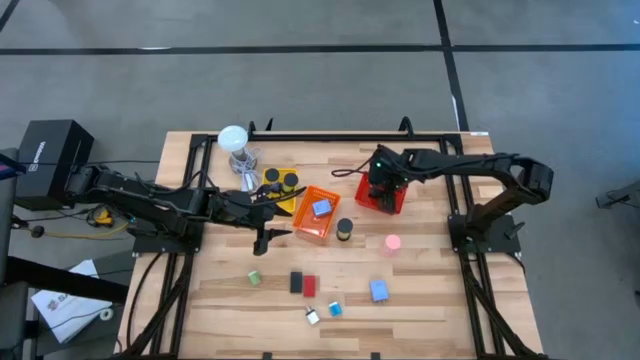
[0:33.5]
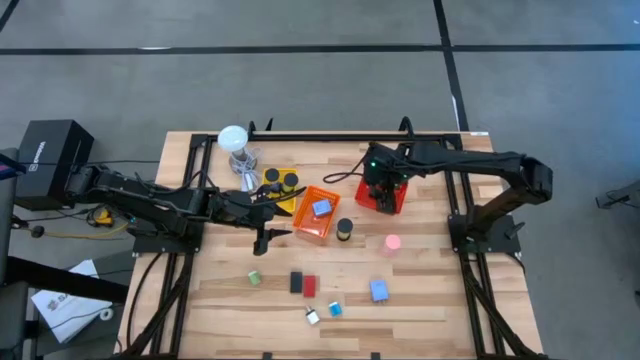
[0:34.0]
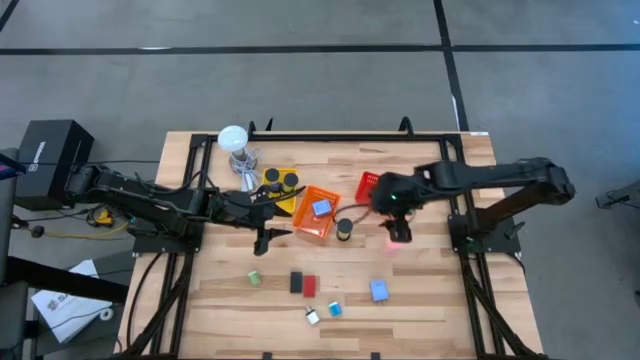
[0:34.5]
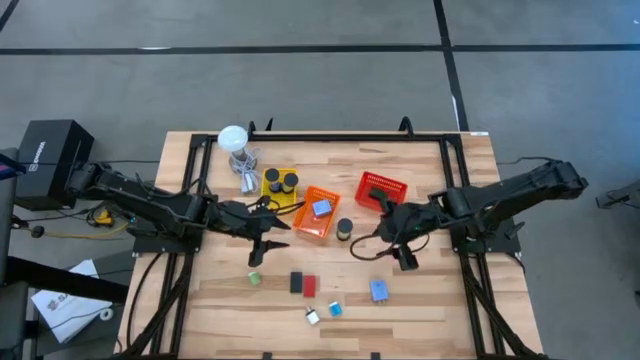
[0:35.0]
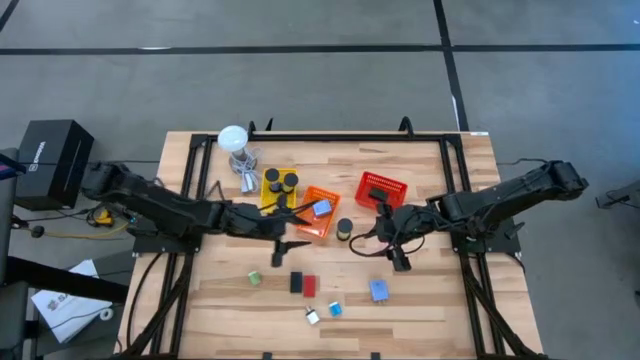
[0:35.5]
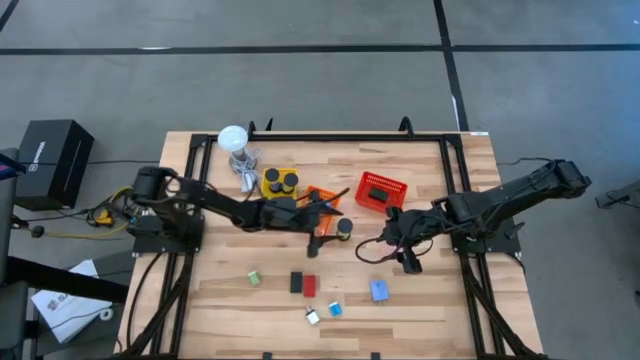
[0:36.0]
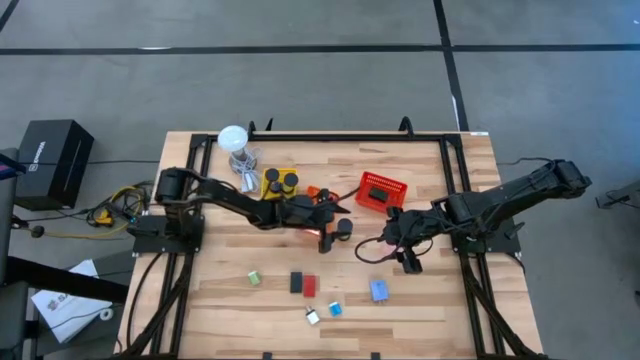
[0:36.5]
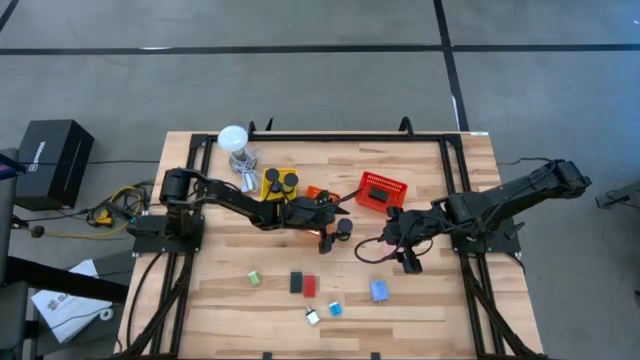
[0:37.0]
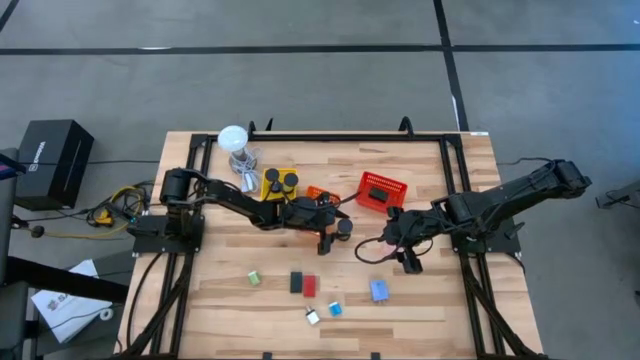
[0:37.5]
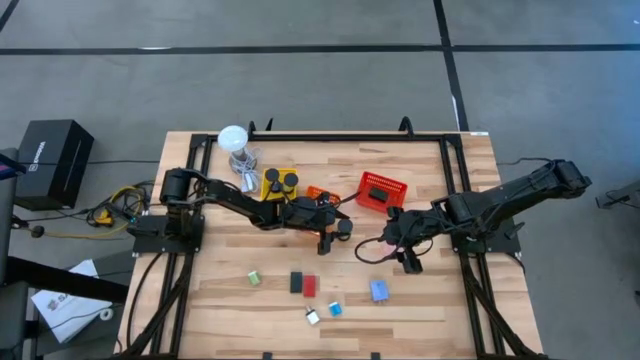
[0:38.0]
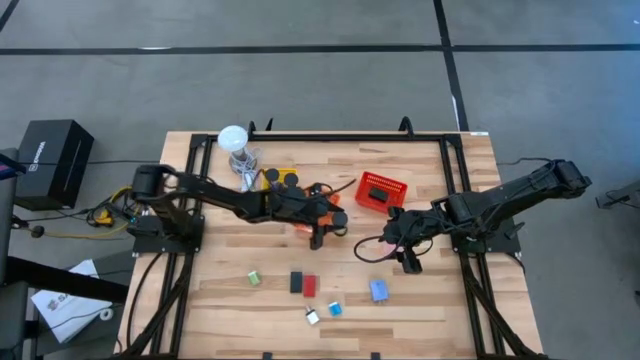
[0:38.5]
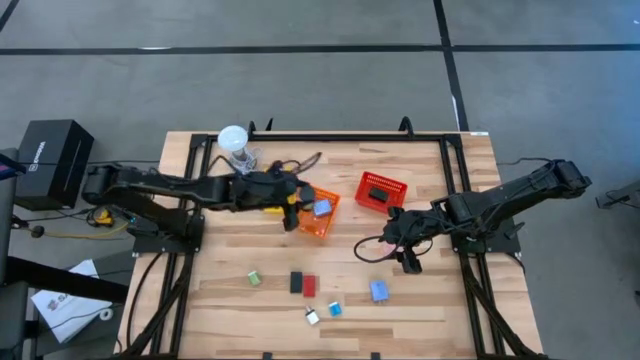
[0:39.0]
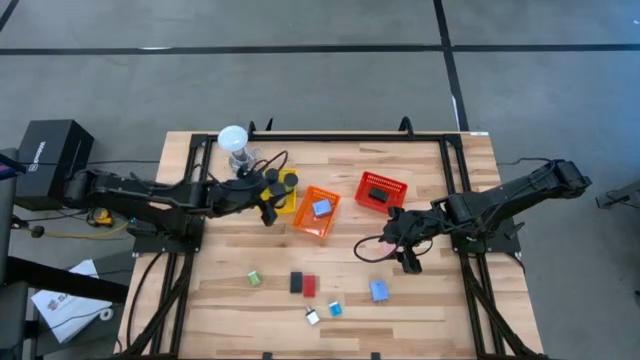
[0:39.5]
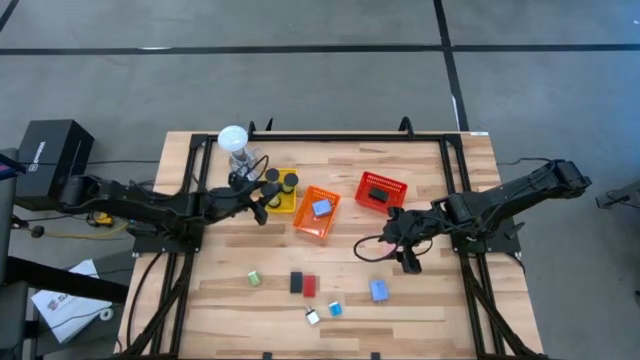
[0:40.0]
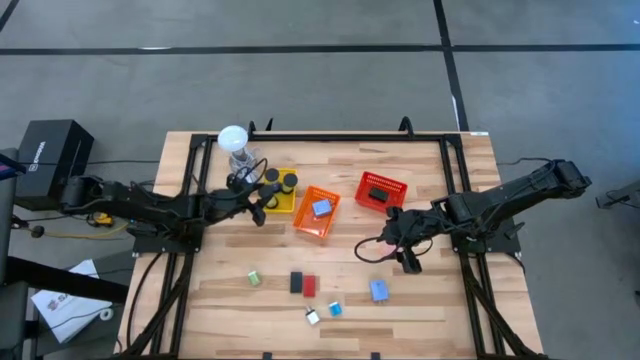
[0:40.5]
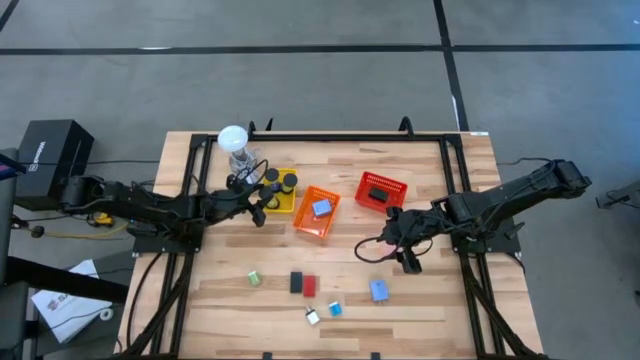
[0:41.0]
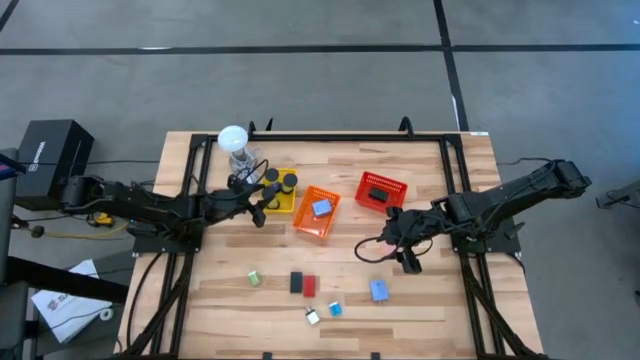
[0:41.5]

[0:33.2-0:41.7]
Task: Pick & Place Office items
Put the black sand timer into the yellow bin

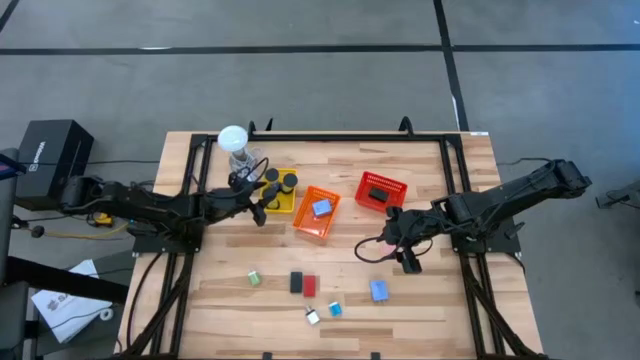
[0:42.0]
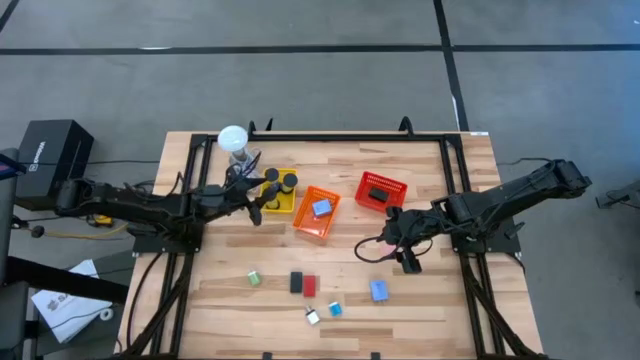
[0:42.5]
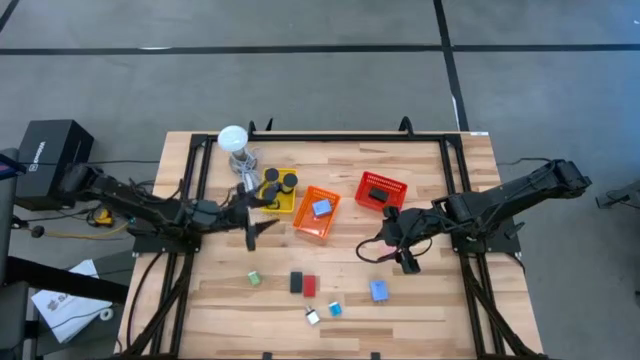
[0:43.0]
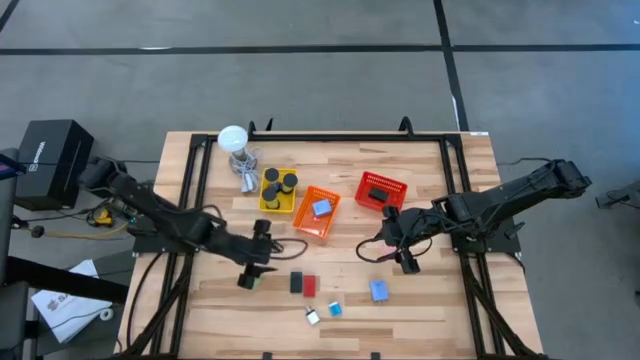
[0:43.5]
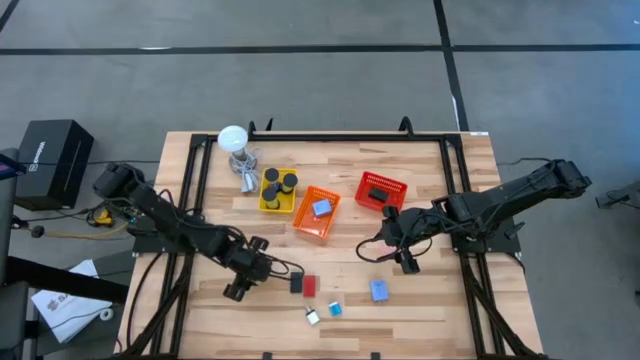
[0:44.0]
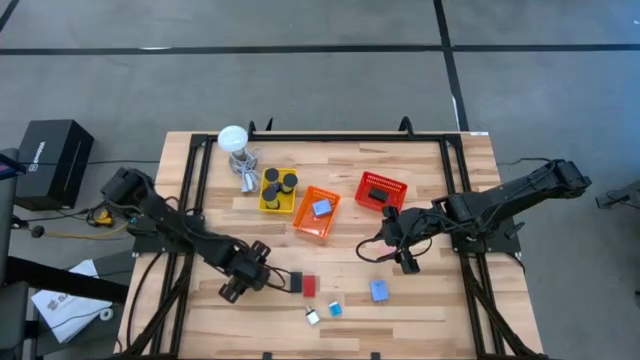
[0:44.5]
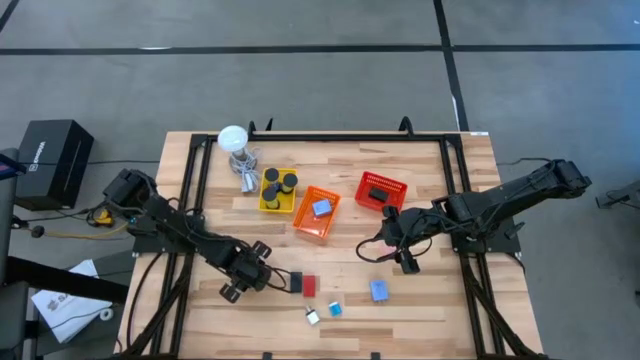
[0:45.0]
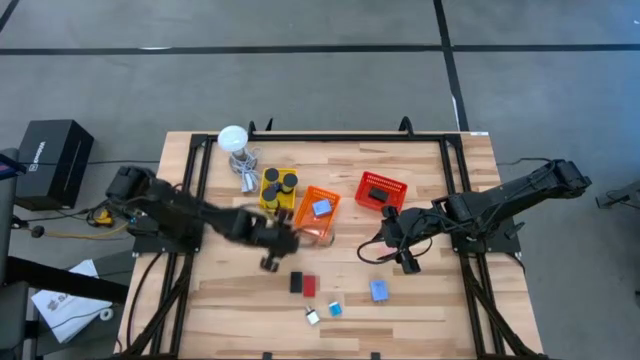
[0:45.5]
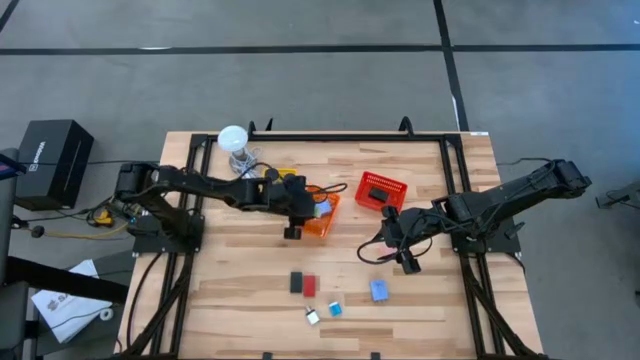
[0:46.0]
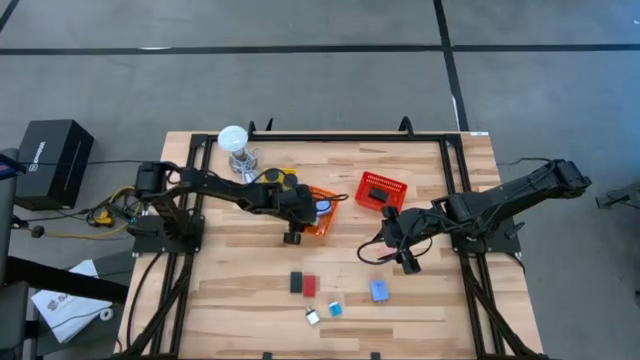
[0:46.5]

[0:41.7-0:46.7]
Put the green charger adapter into the orange bin

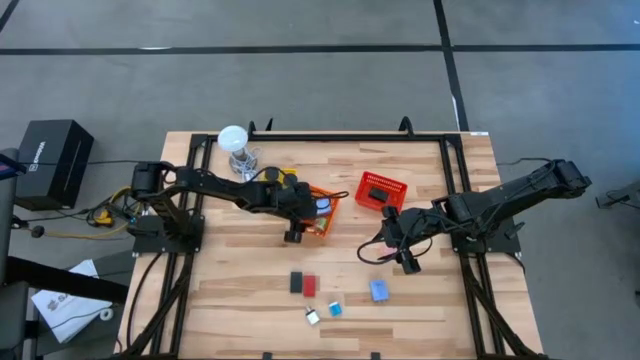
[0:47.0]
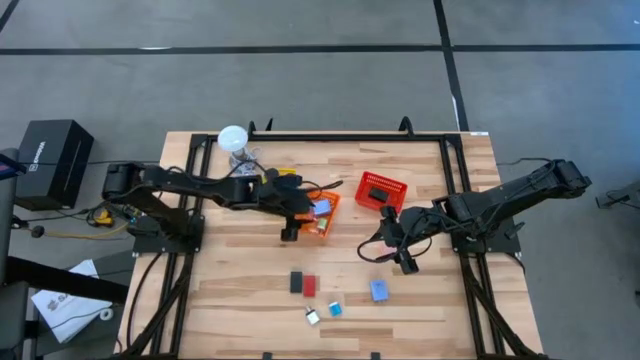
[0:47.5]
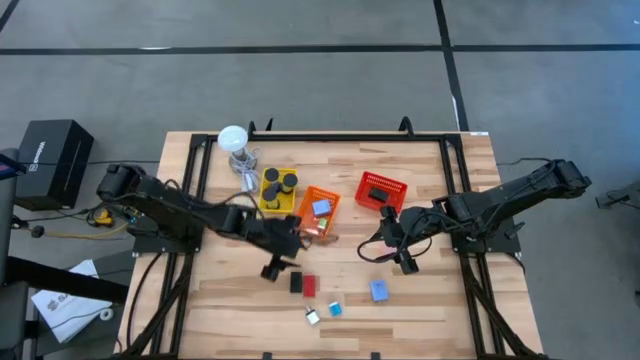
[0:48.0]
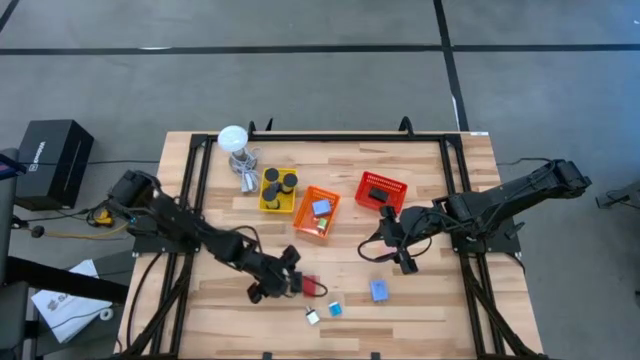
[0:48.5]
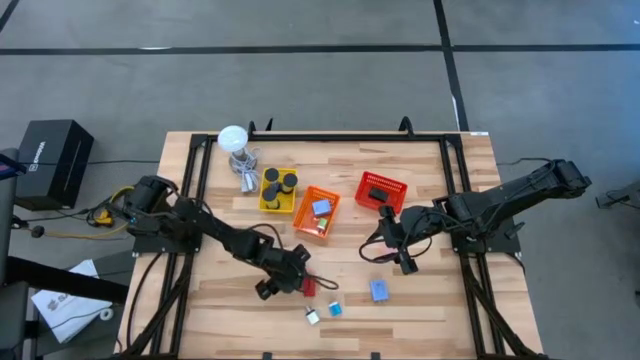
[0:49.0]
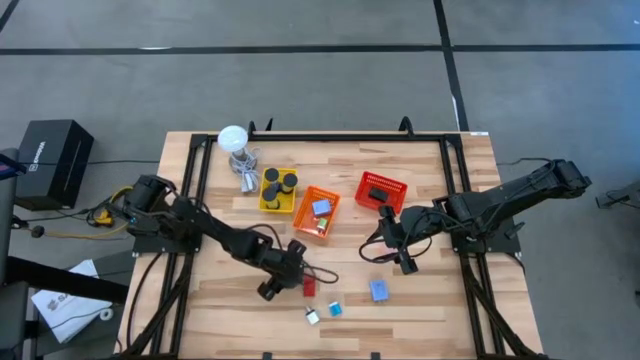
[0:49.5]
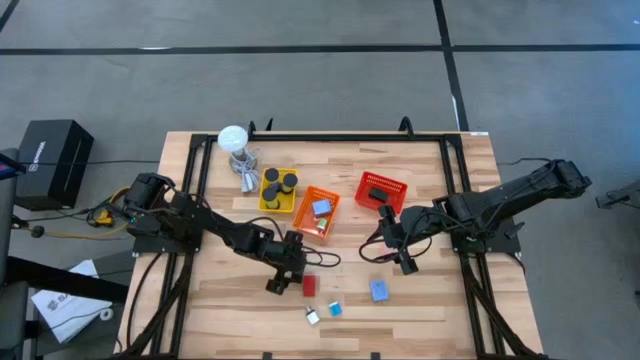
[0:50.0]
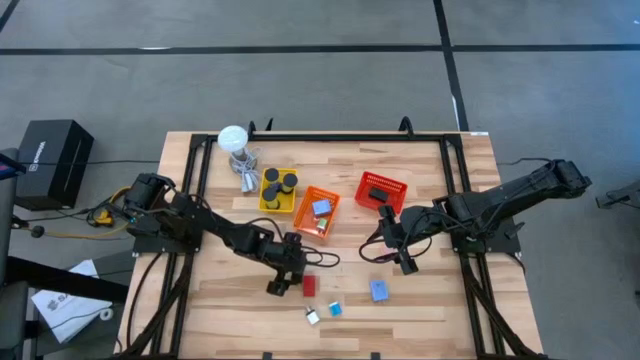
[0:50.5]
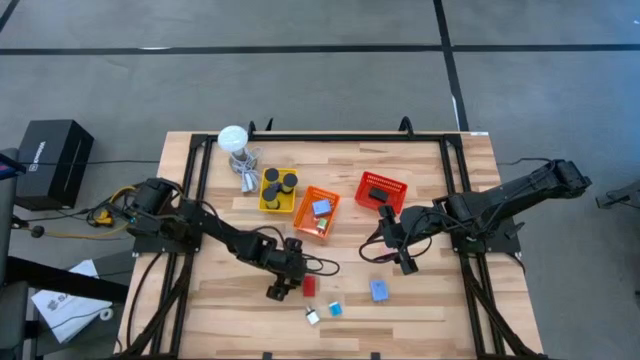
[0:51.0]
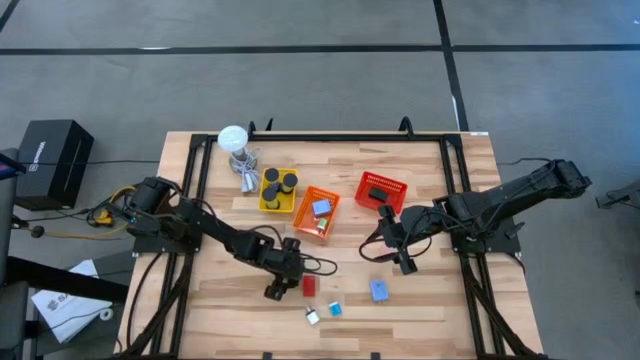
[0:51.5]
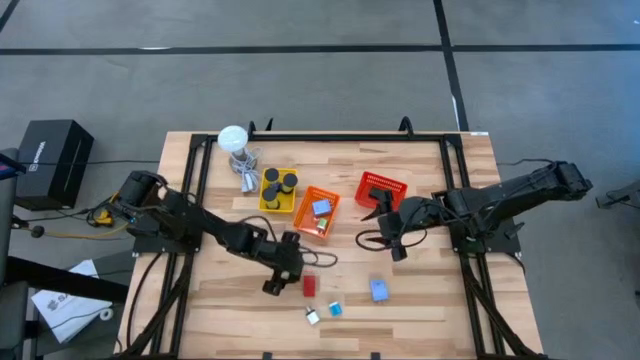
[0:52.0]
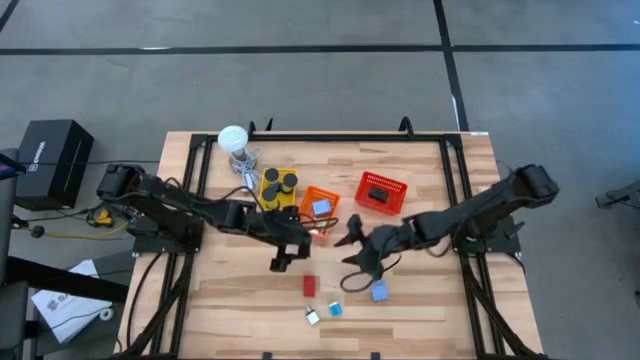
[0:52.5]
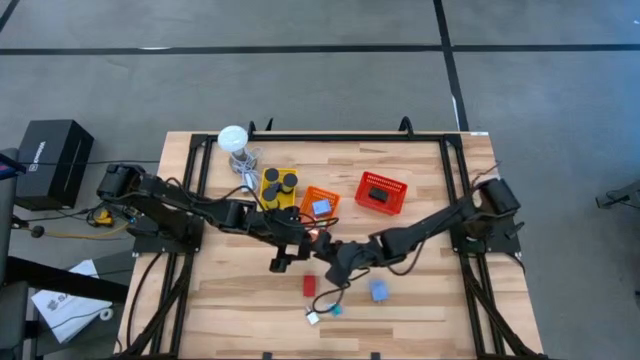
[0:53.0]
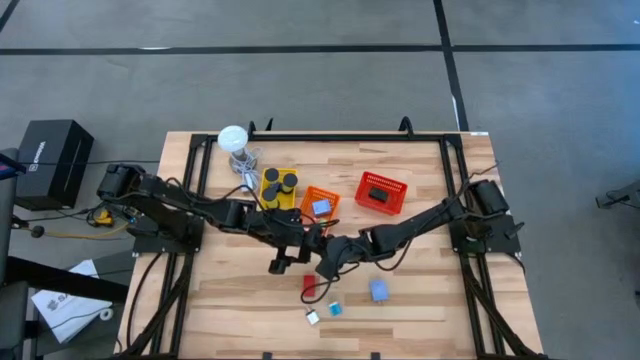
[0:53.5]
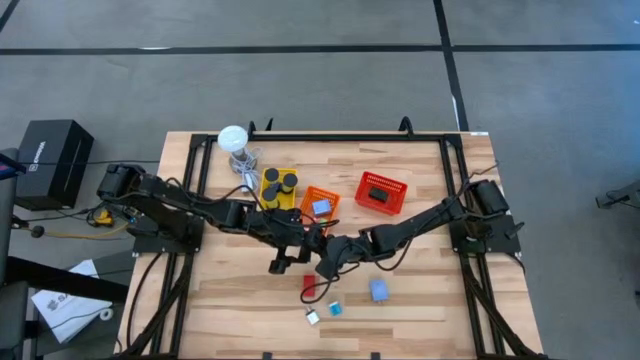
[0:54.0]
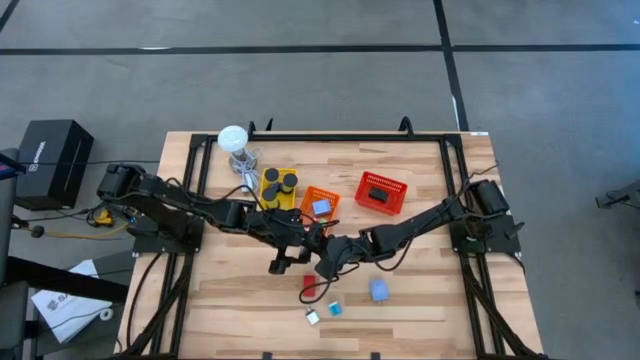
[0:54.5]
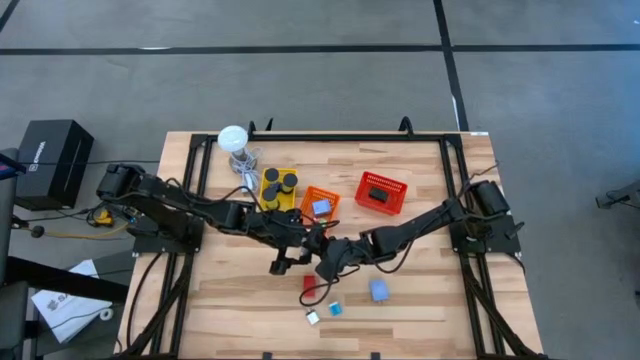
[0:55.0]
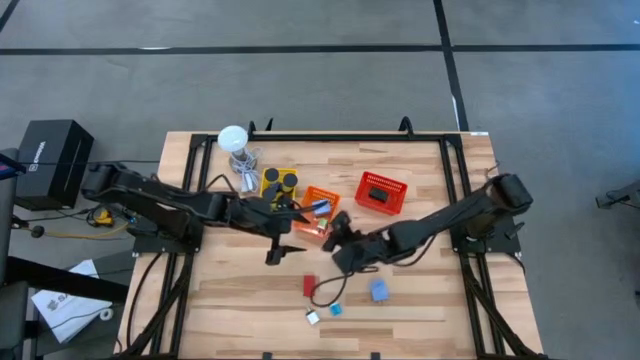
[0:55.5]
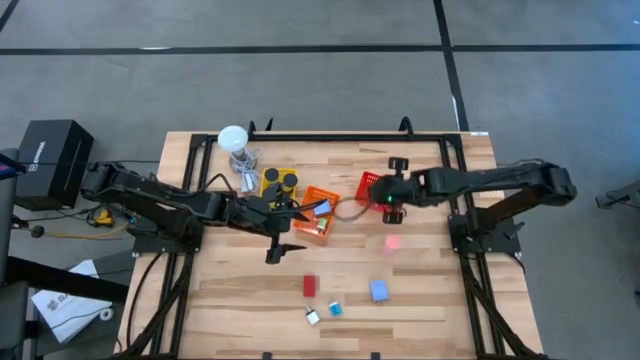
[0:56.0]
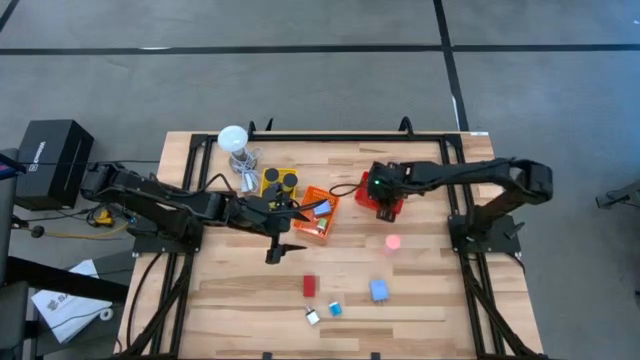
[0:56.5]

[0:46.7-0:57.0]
Put the black digital clock into the red bin
